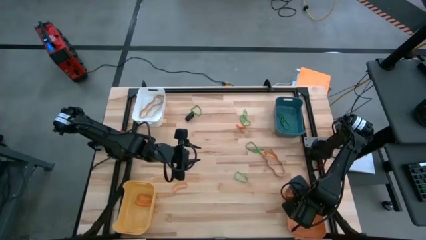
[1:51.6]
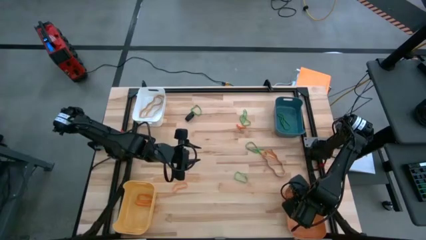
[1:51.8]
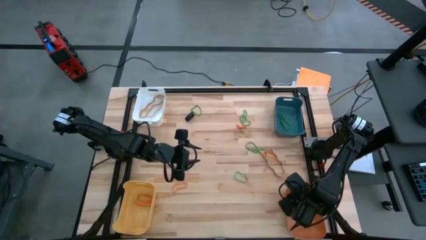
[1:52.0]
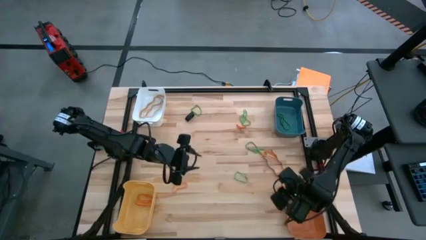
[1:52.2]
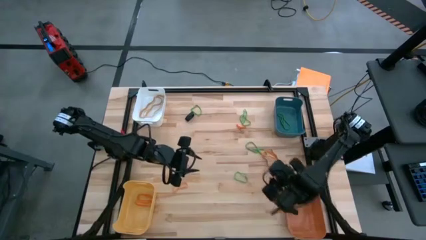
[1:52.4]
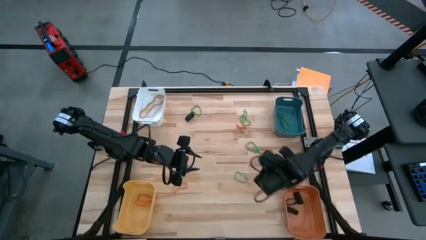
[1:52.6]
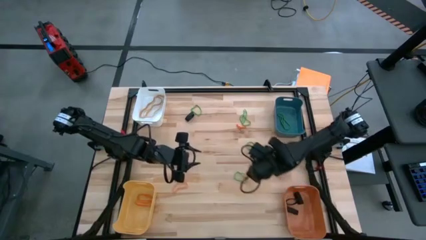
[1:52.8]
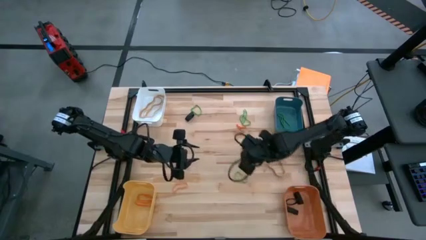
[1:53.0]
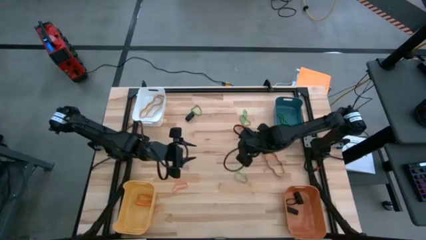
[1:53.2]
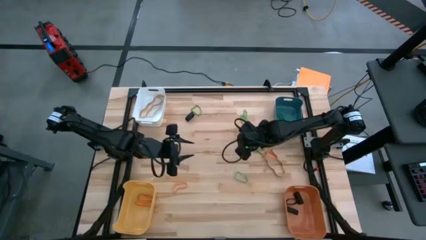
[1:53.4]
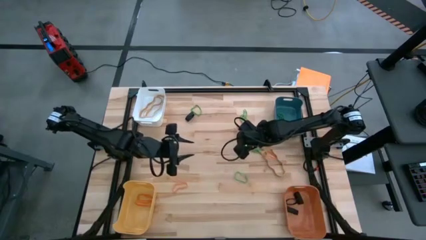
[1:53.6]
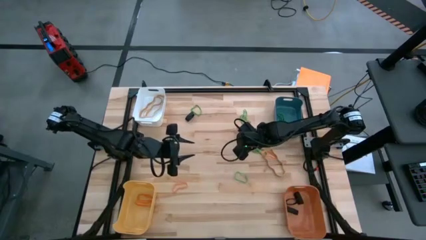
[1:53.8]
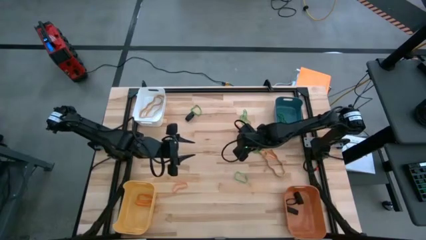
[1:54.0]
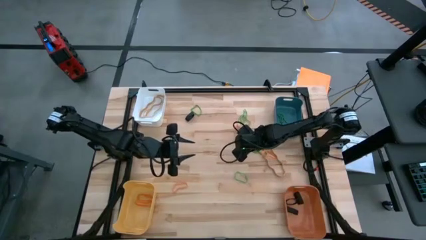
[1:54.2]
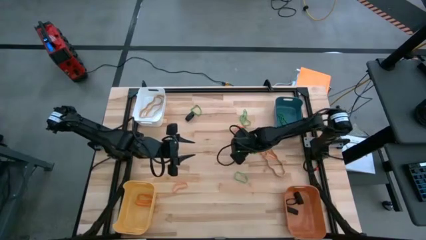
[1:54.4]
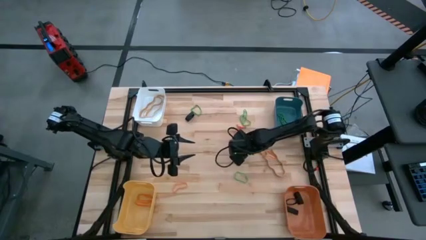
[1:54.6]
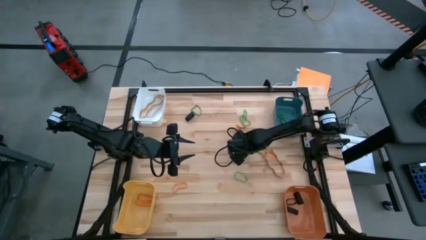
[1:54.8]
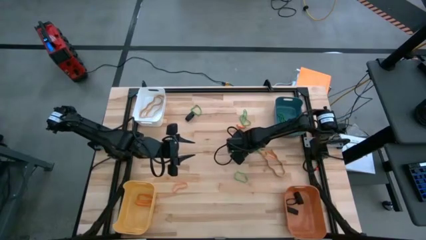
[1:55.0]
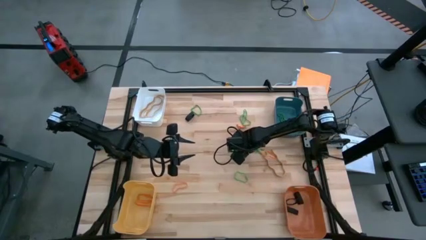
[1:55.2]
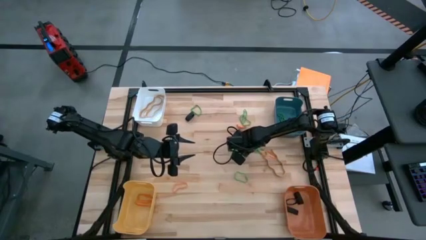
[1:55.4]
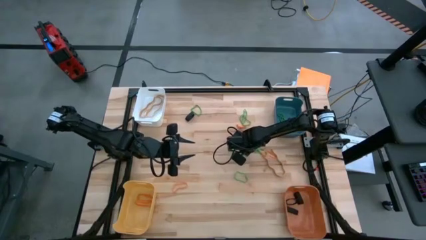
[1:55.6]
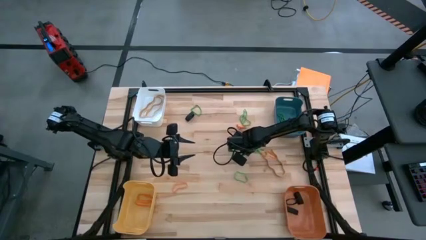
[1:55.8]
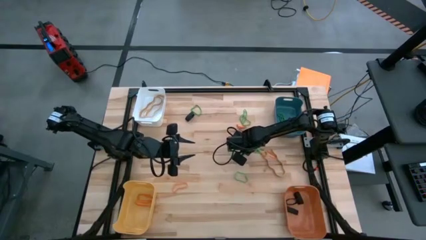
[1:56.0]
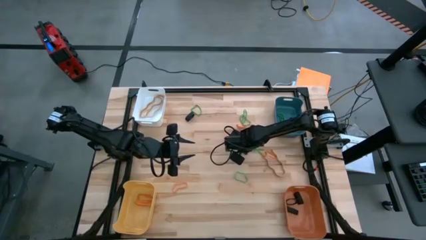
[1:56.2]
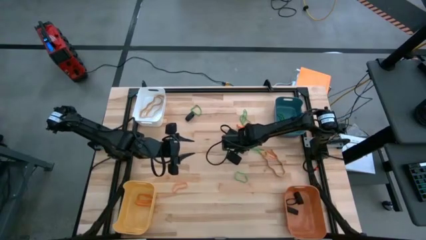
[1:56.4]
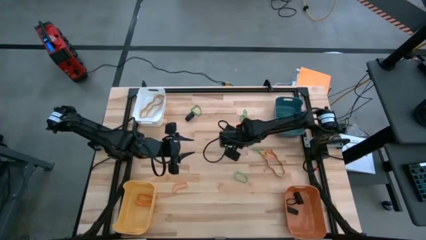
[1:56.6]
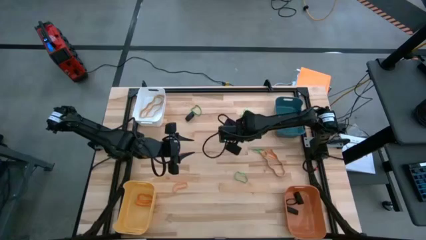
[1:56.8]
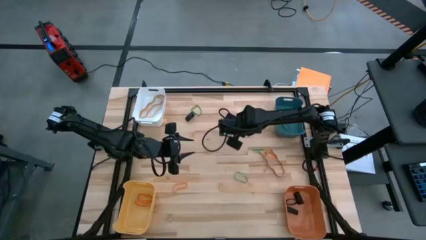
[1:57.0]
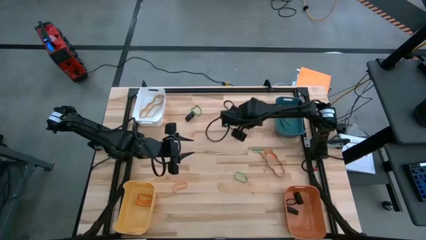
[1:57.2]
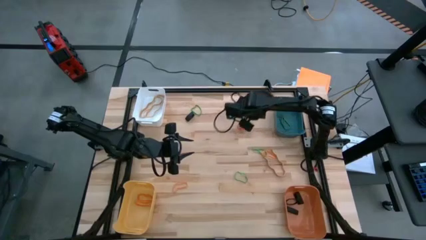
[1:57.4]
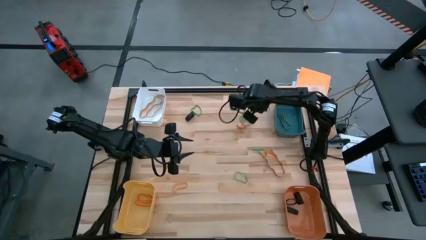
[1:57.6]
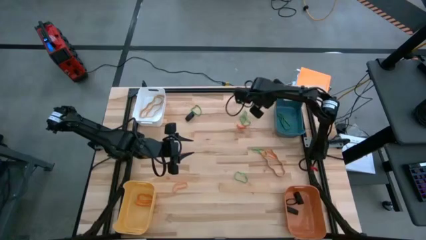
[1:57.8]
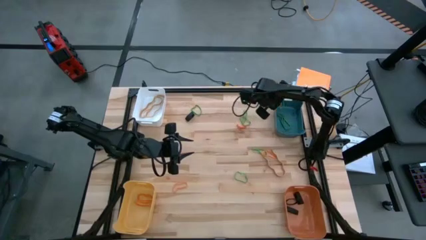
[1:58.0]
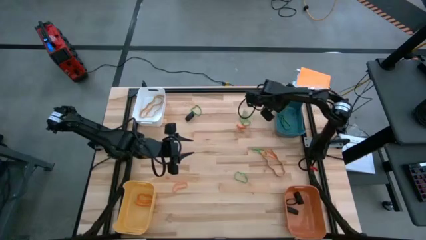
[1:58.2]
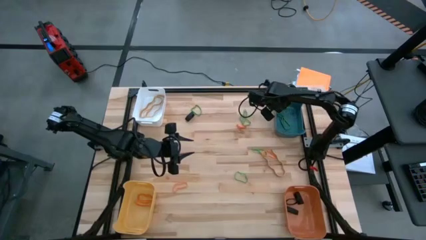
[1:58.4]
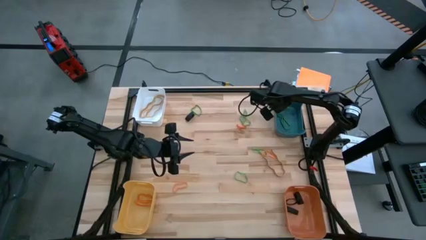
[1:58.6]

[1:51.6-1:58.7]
Task: Sort rubber bands into baskets
Put the green rubber band into the blue bin

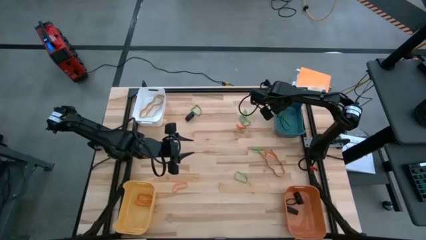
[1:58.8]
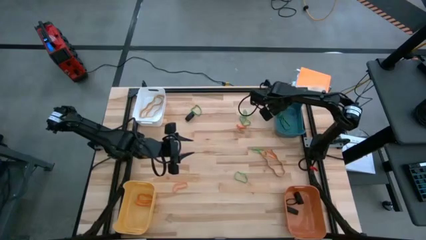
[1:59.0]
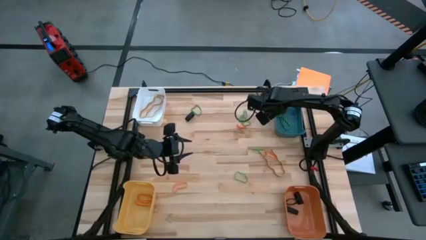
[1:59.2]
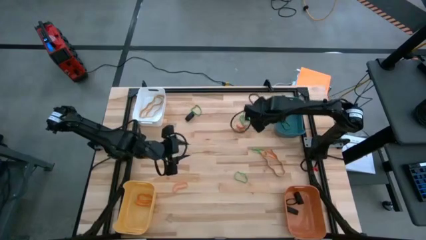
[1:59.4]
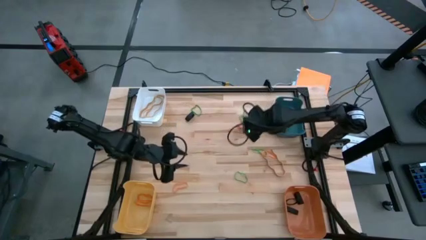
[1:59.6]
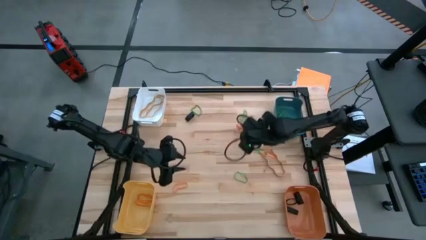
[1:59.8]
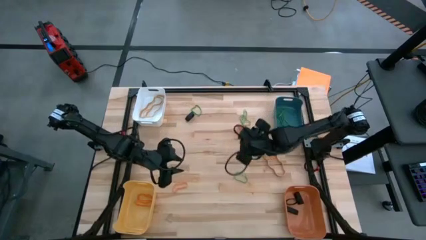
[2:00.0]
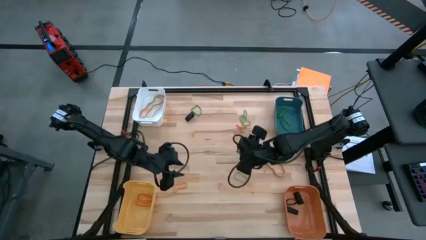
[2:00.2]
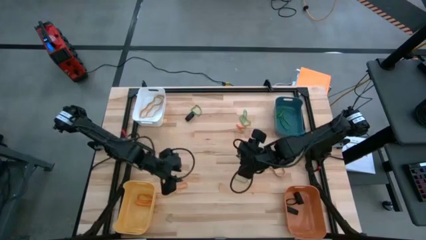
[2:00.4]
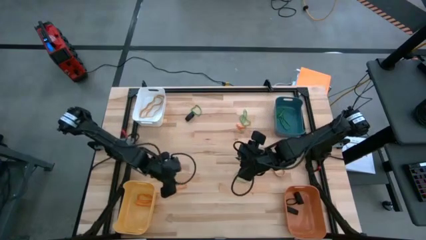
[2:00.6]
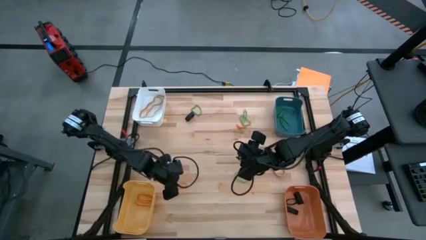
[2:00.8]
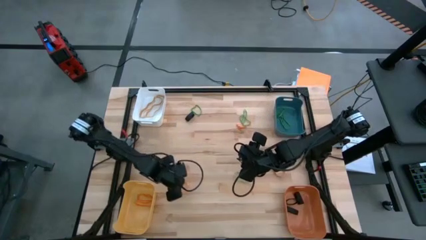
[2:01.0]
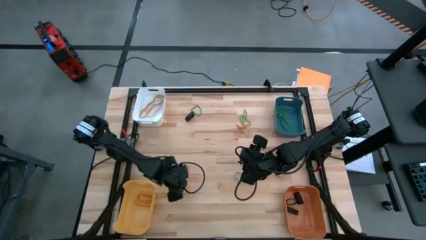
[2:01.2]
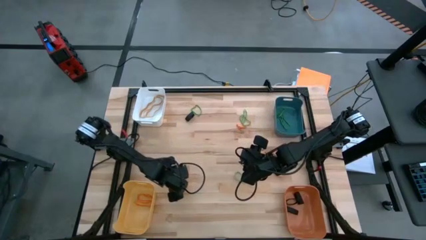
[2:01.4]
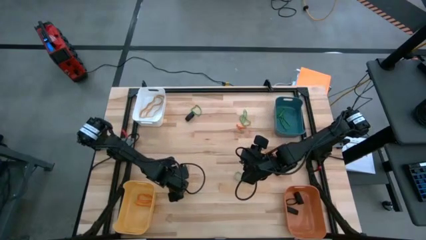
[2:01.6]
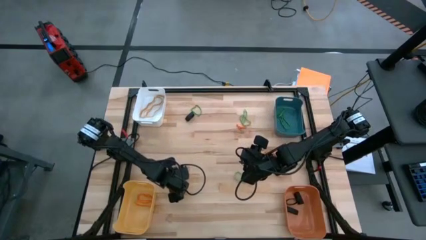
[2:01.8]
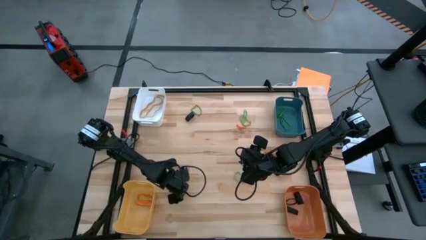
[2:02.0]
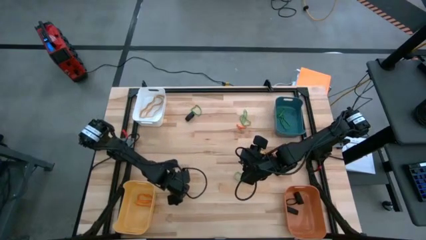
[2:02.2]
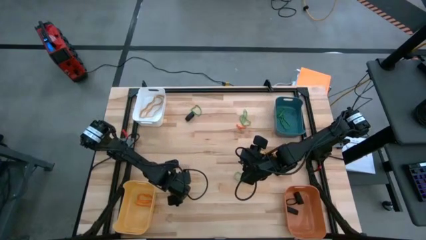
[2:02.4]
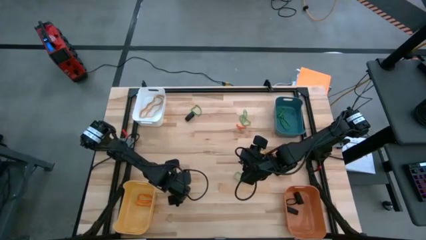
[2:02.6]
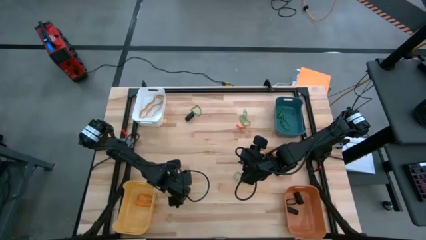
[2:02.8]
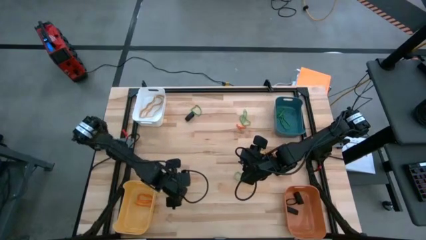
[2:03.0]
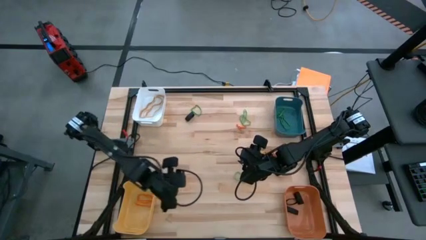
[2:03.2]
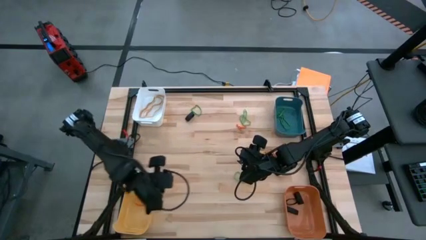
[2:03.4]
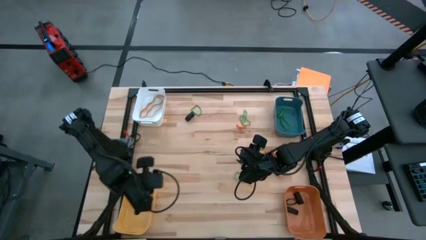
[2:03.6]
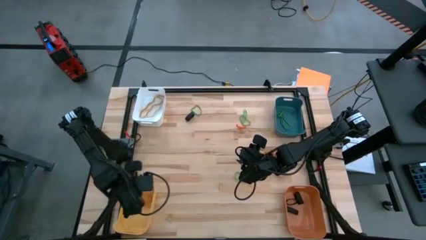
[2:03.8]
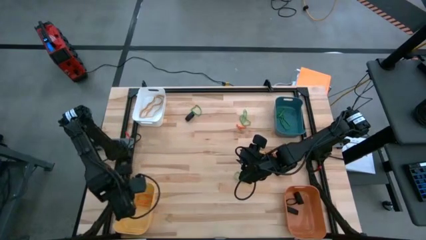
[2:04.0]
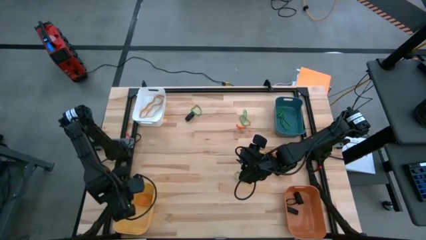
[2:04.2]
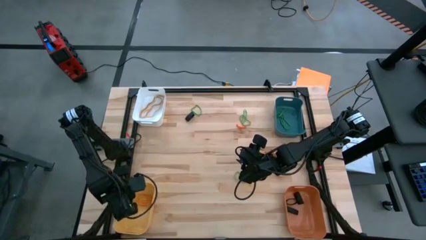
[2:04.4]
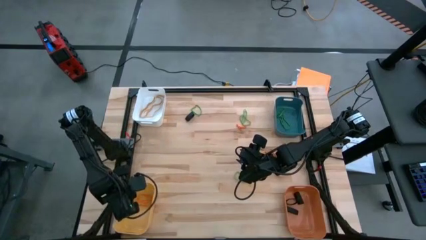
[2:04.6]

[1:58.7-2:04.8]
Put the orange rubber band into the yellow bin

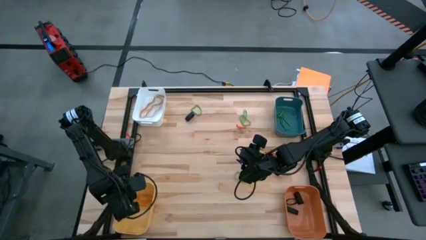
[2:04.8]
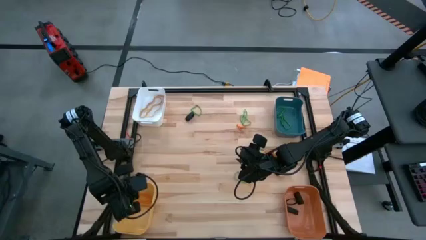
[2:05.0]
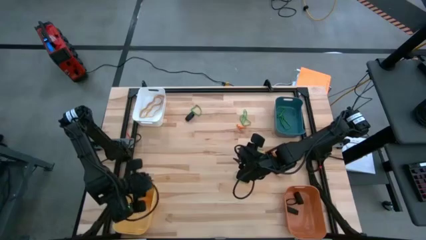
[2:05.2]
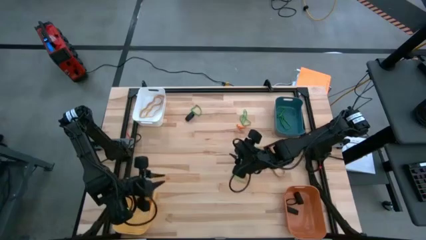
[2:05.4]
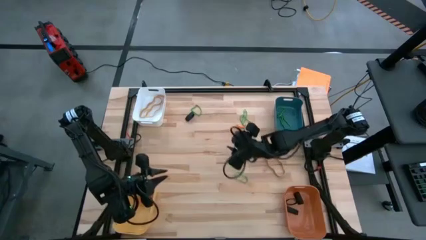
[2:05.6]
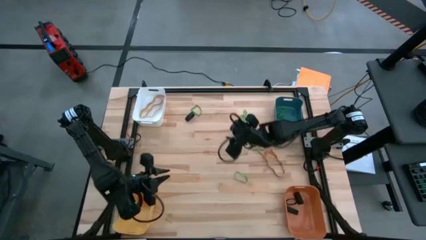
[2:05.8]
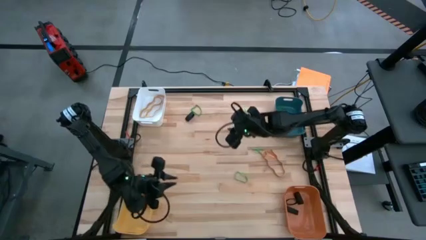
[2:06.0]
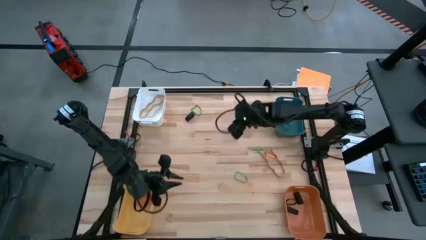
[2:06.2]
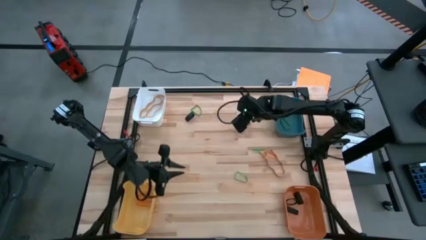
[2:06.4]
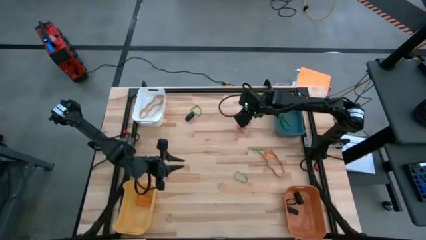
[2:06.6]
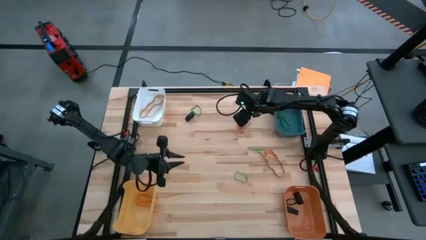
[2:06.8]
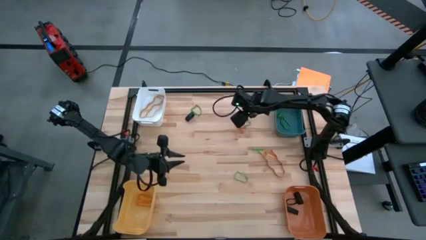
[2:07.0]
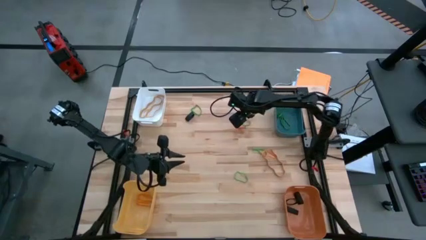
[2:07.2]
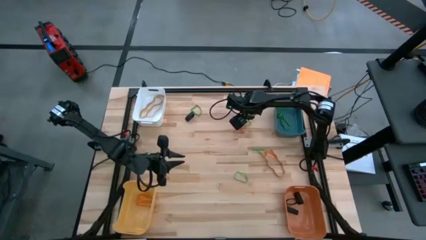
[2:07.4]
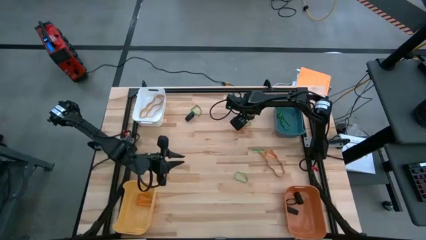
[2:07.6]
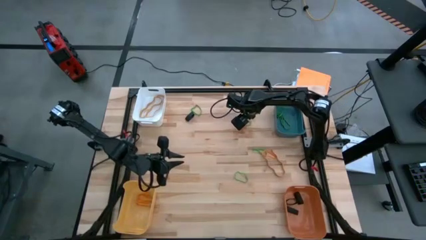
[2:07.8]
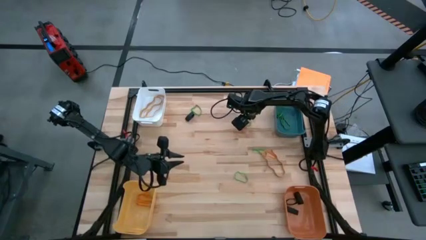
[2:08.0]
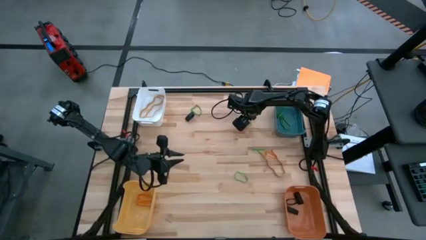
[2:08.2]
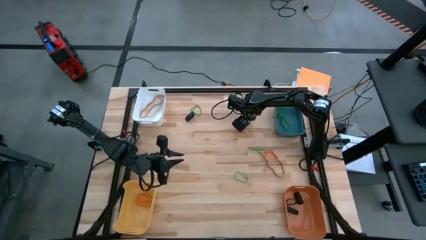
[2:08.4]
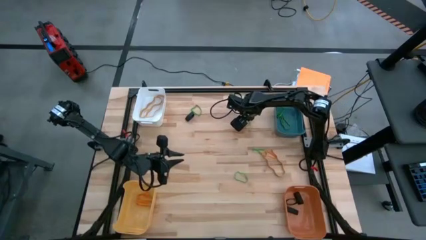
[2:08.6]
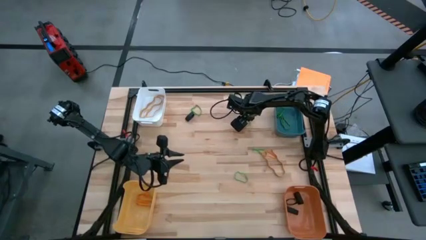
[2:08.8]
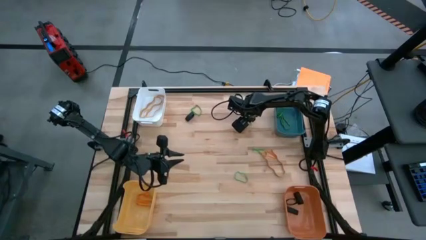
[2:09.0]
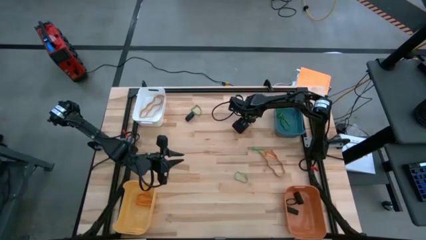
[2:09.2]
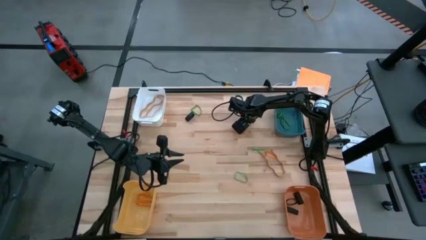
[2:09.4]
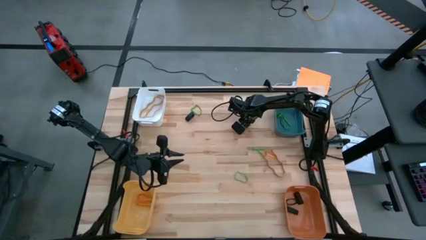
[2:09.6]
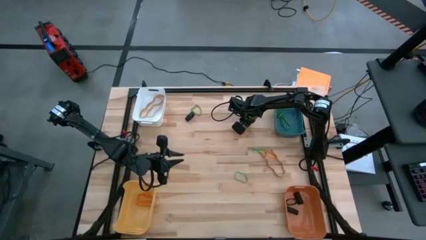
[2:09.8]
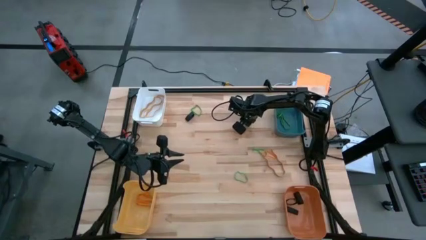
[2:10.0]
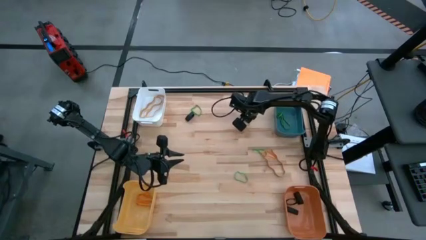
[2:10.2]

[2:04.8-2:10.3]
Put the green rubber band into the blue bin
